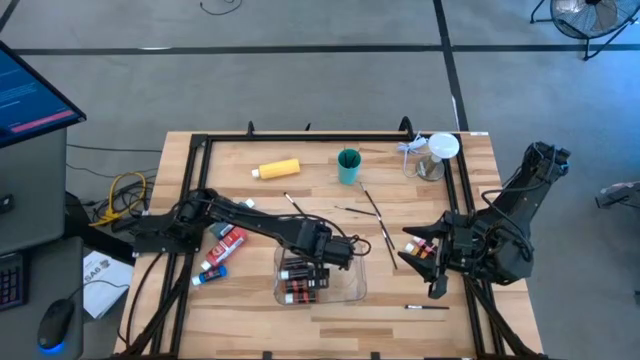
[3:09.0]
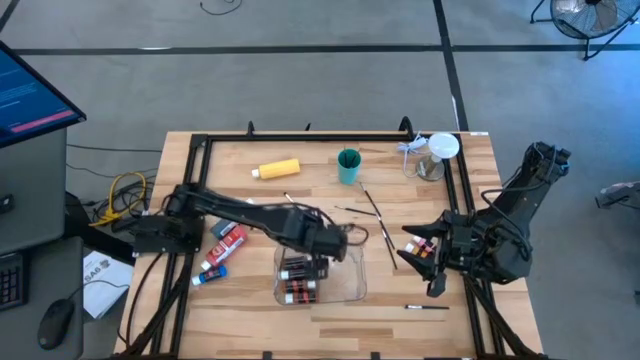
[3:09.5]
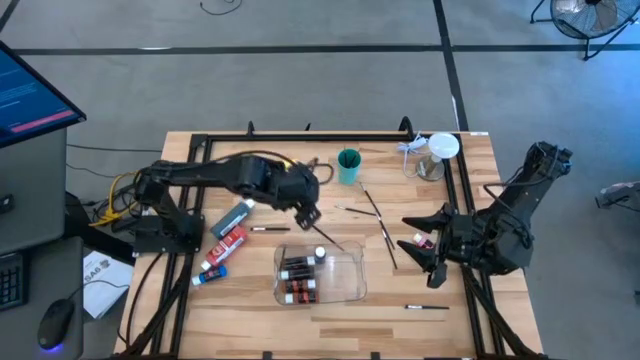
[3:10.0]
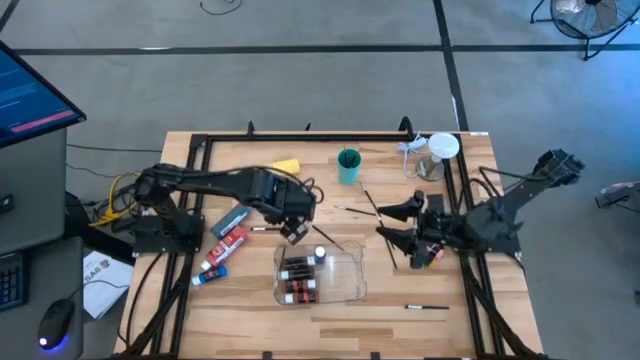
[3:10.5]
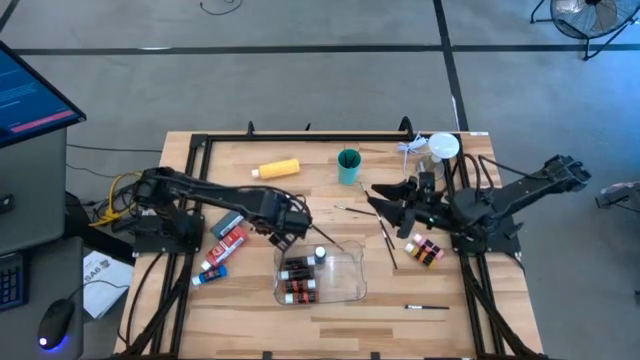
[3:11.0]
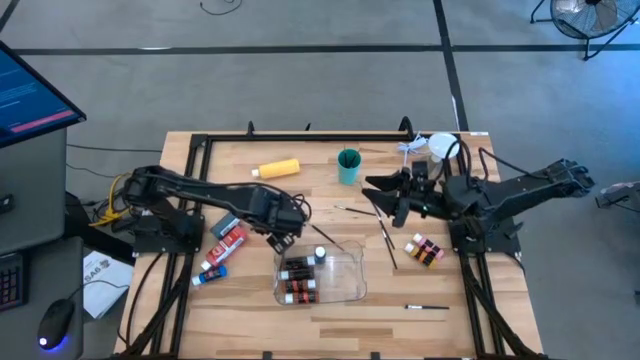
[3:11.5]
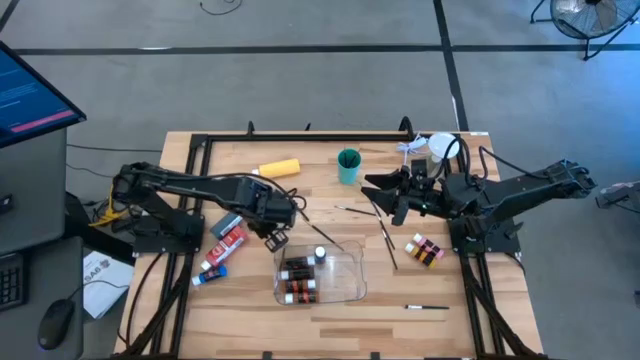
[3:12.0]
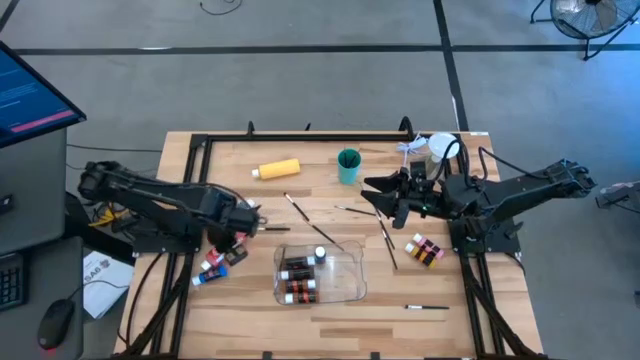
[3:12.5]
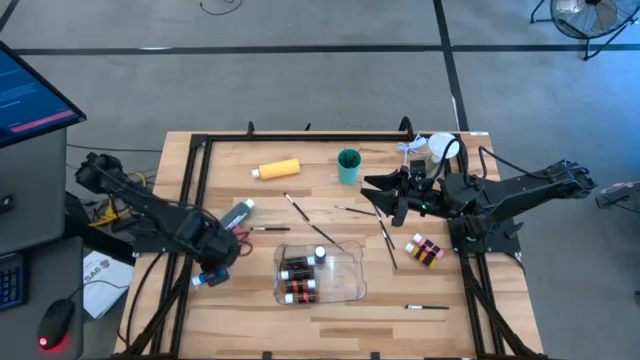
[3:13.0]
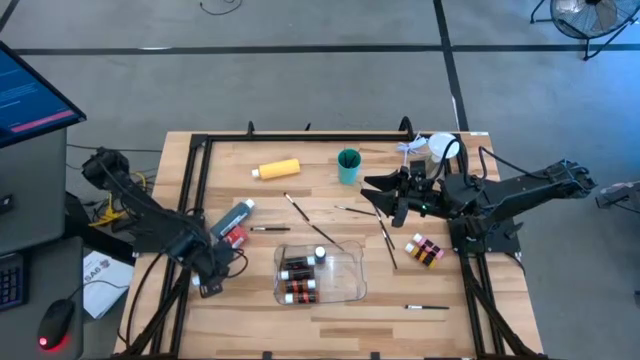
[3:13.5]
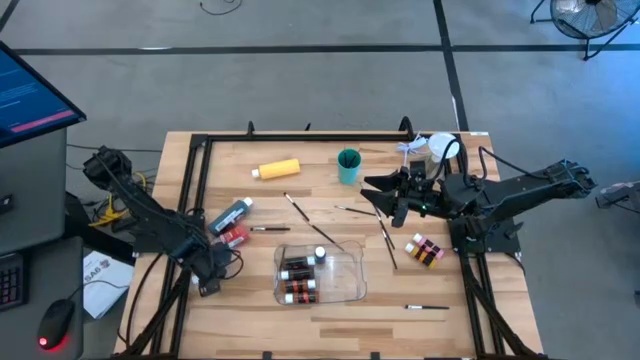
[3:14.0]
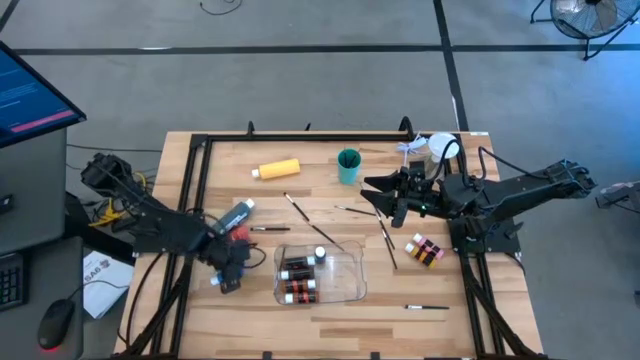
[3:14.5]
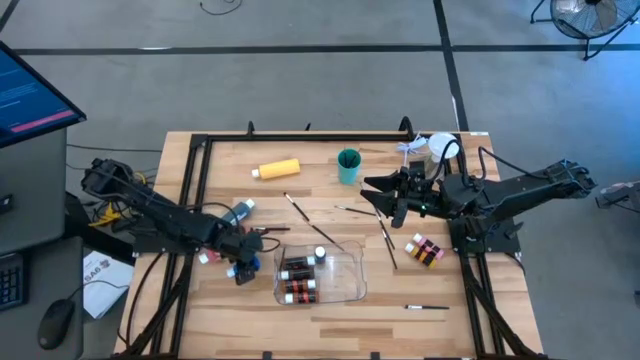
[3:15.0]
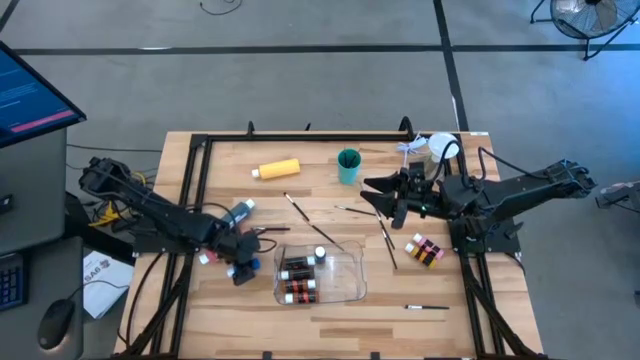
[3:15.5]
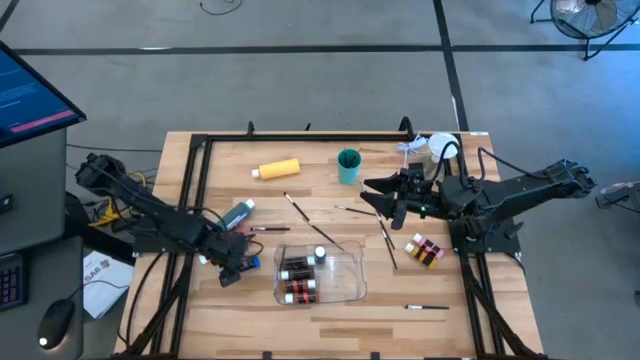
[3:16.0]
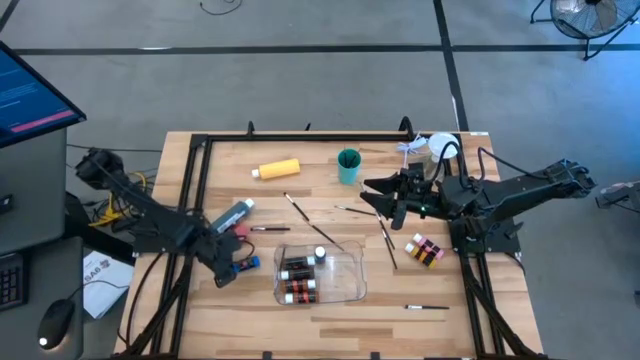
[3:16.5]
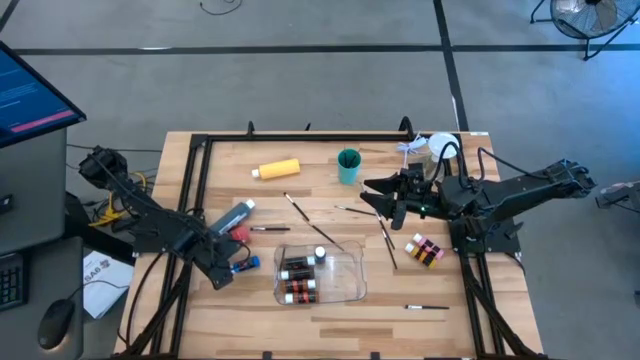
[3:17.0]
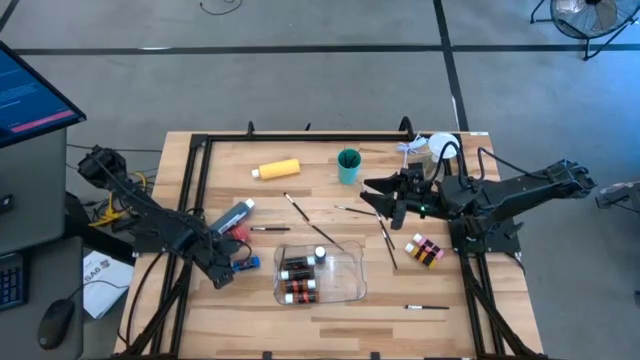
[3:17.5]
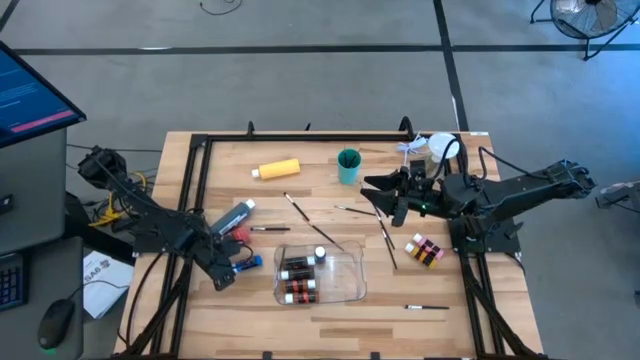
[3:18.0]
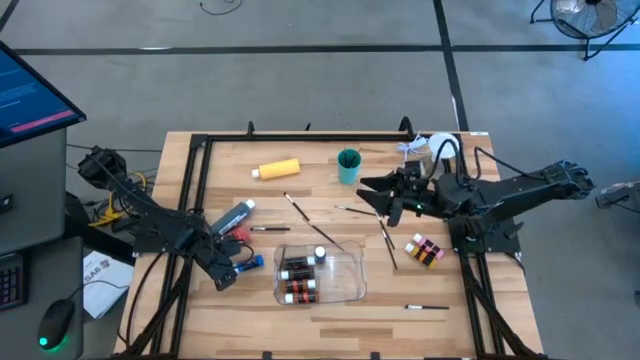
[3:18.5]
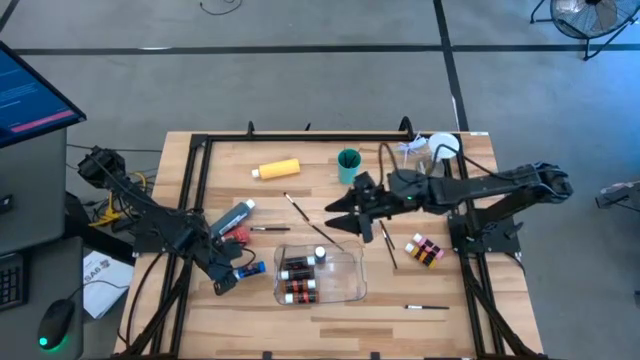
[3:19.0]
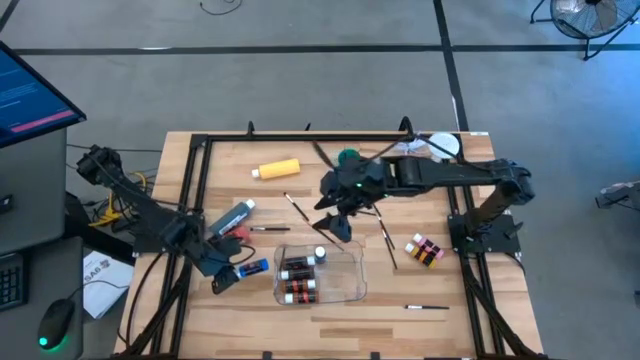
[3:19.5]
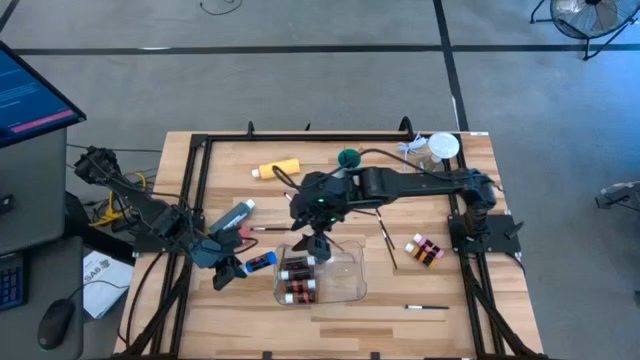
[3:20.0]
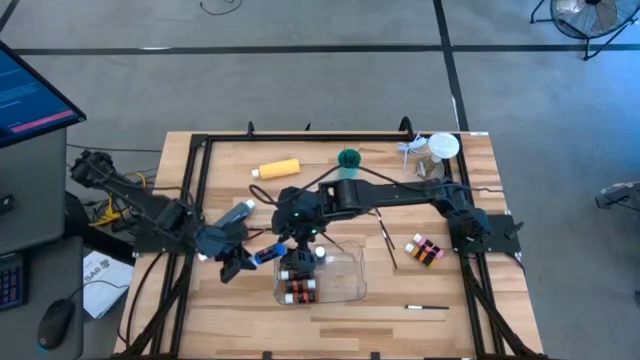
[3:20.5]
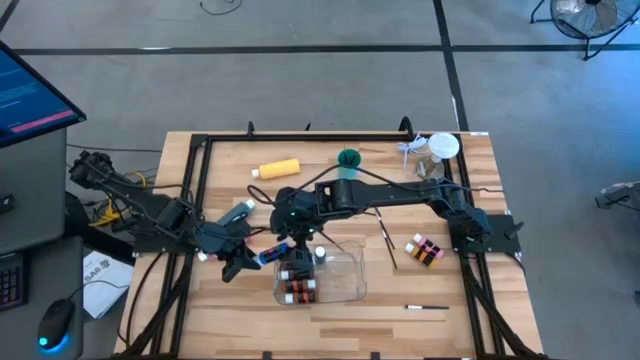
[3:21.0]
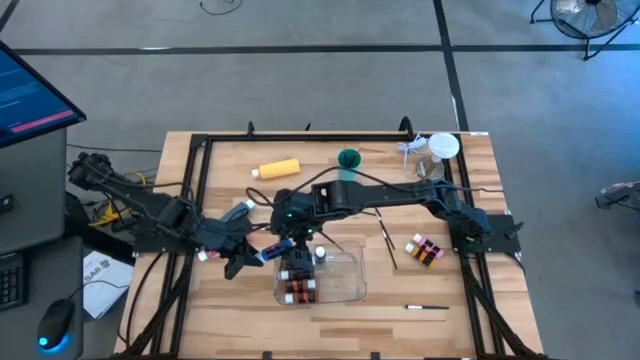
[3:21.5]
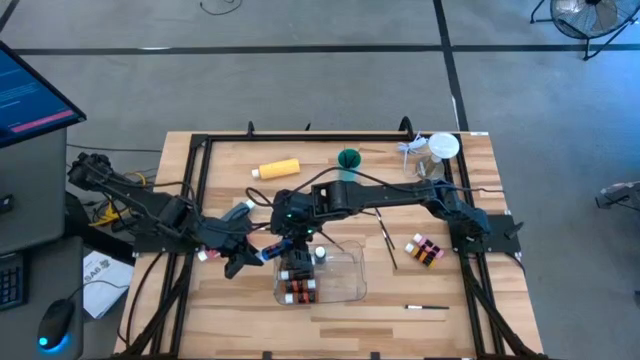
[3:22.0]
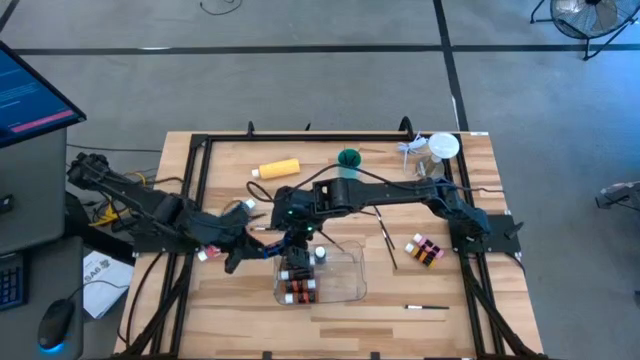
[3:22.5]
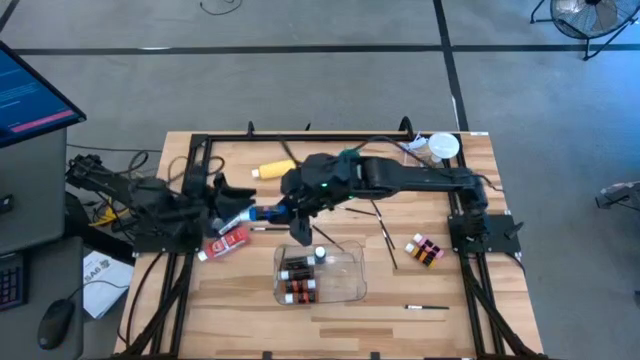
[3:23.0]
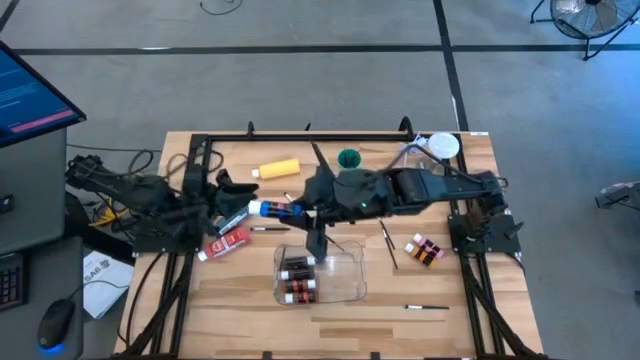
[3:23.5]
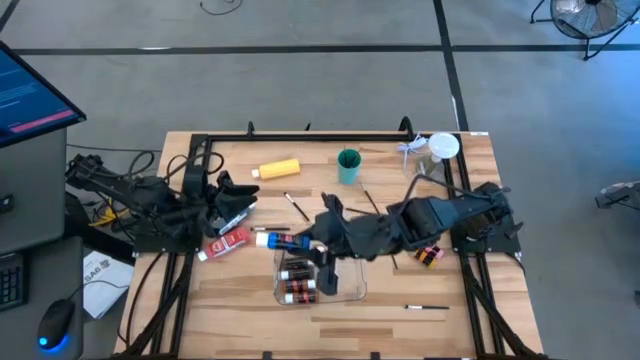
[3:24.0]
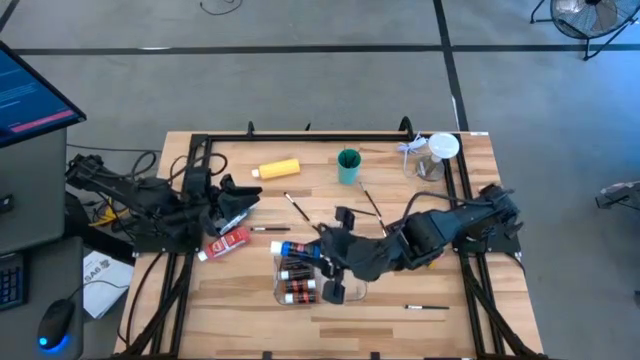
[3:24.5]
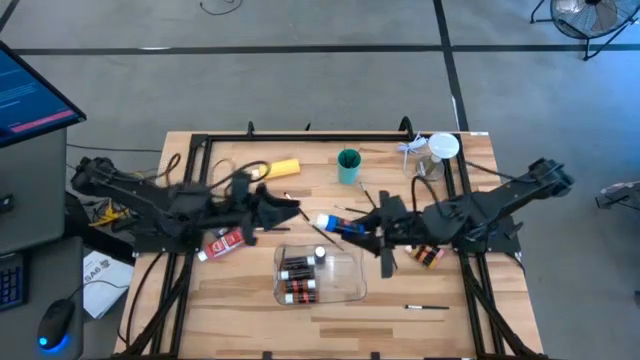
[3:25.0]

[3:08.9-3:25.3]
Task: Pick & Place Paint Supplies
Put the blue paint bottle into the transparent bin

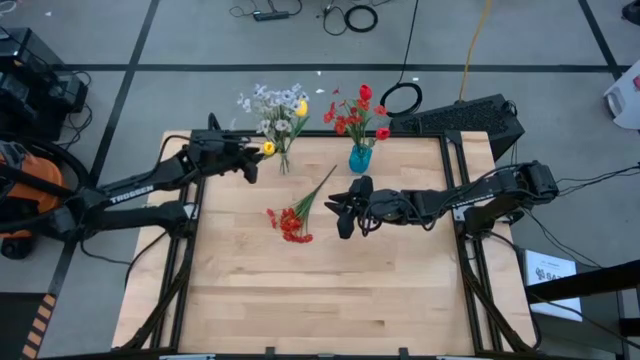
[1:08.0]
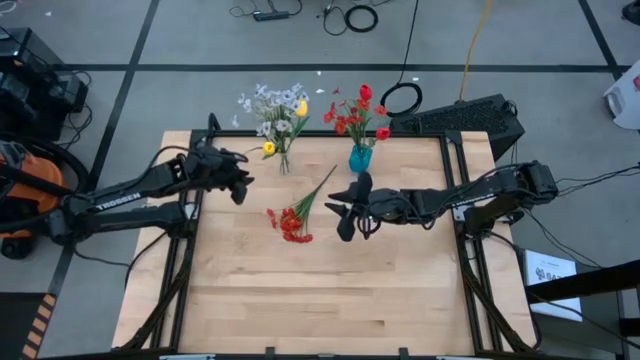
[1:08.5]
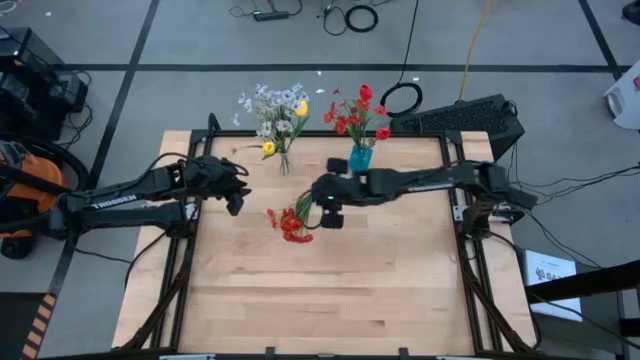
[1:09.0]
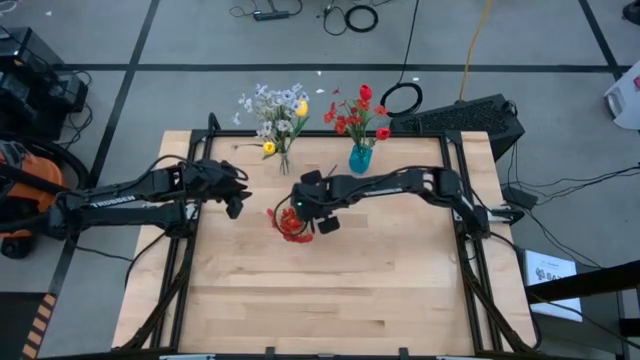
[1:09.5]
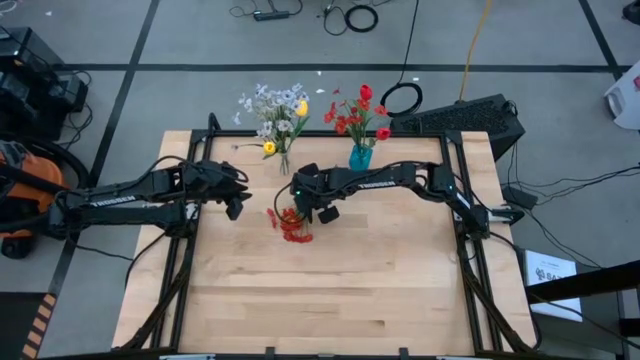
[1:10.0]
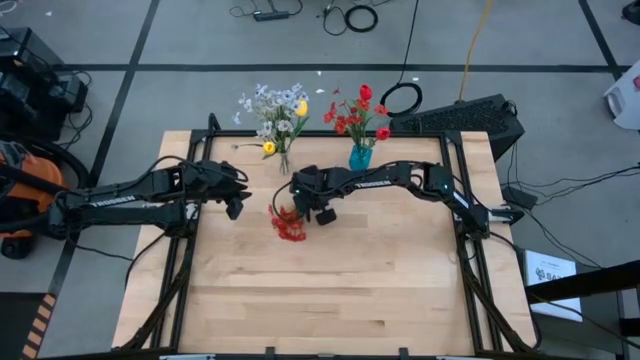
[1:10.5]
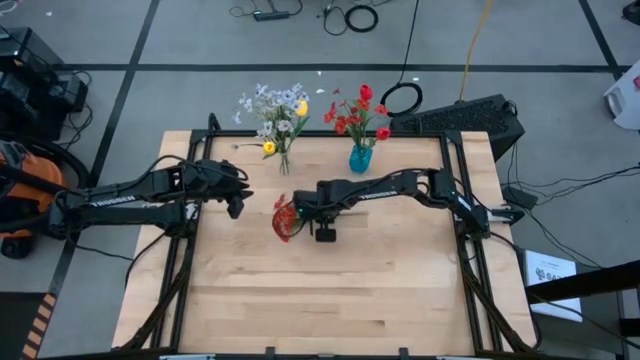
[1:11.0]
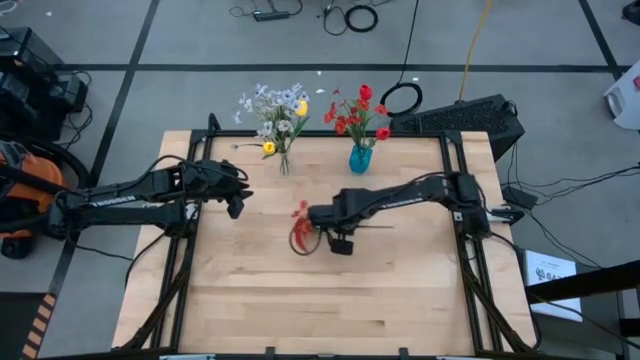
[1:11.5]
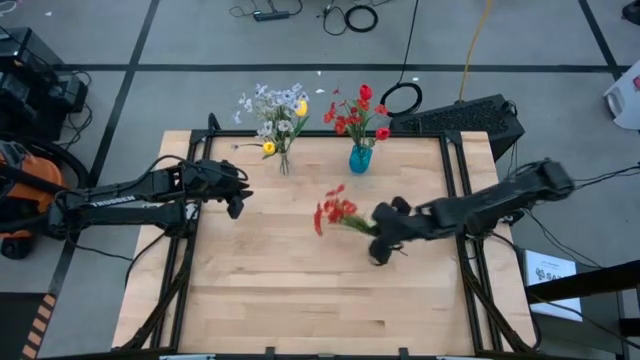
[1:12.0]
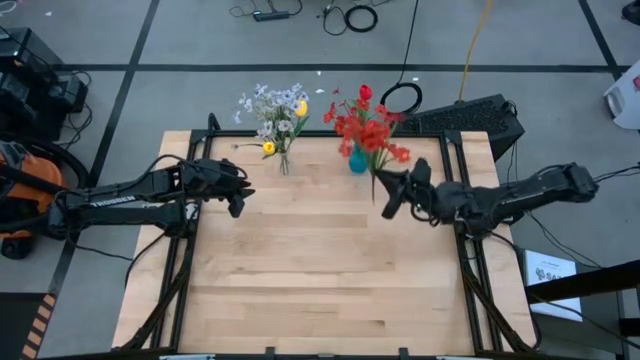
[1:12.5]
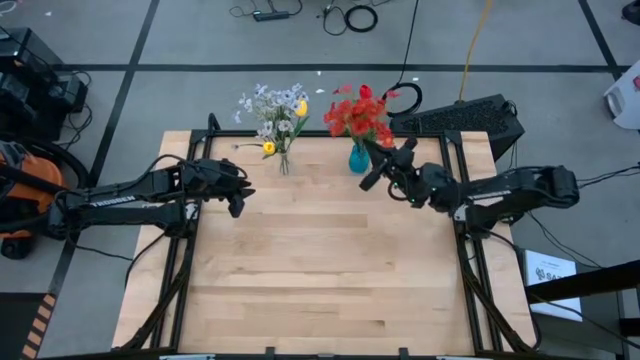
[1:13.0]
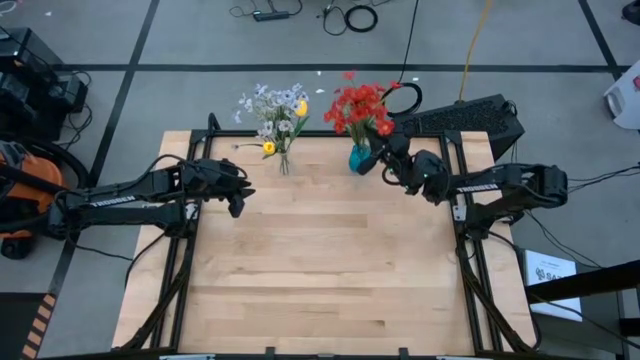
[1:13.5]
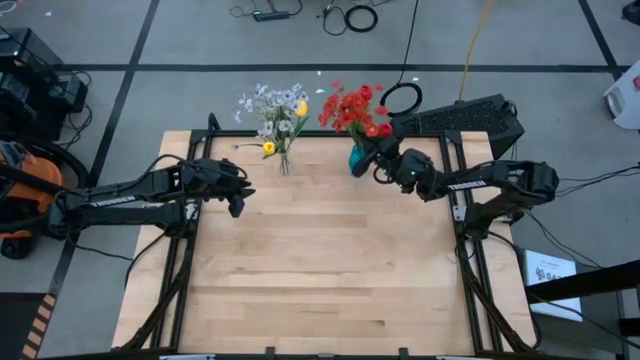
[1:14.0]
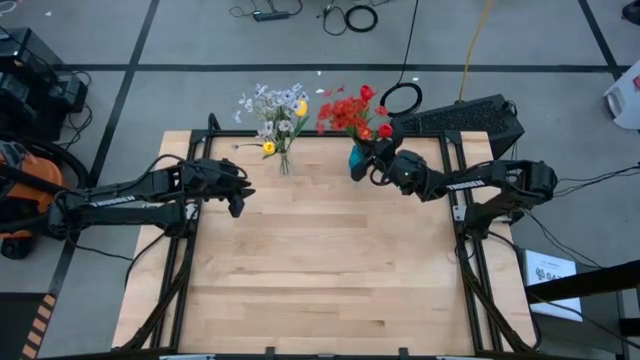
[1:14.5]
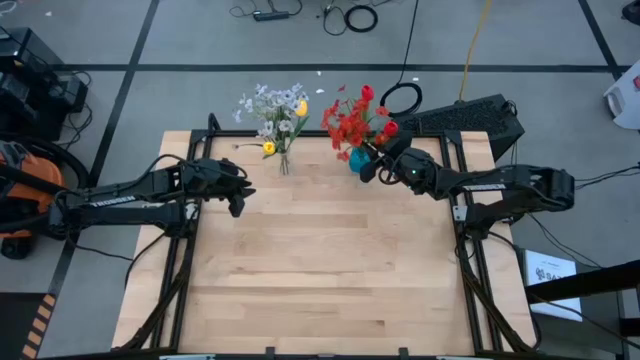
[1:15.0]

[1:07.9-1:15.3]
Task: Sort flowers into vase by color
Put the red flower into the blue vase
